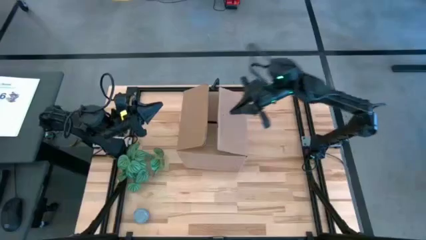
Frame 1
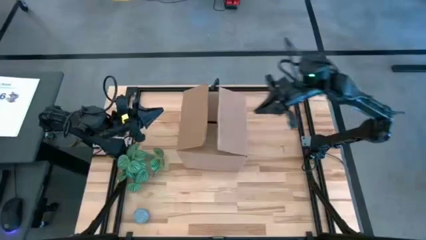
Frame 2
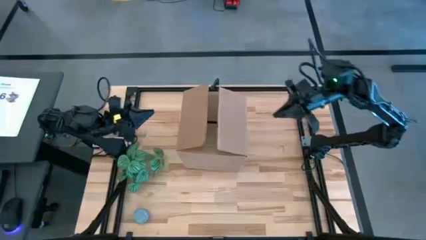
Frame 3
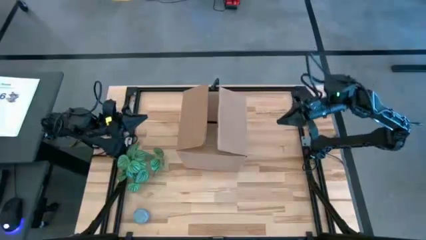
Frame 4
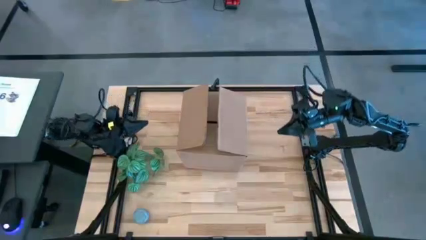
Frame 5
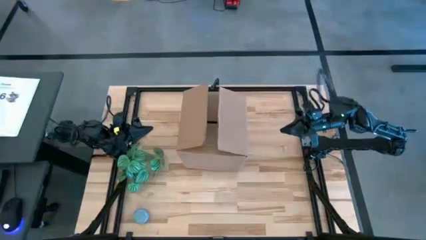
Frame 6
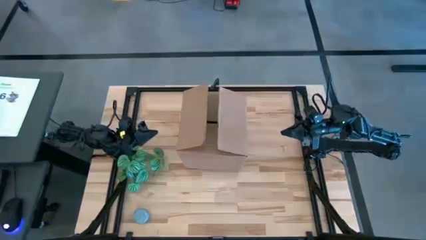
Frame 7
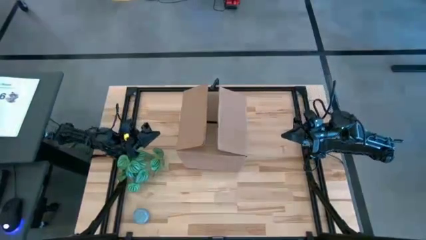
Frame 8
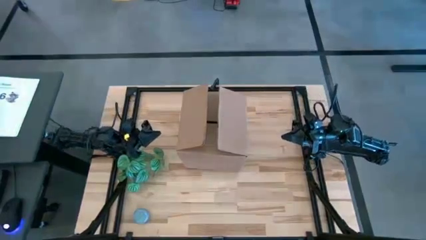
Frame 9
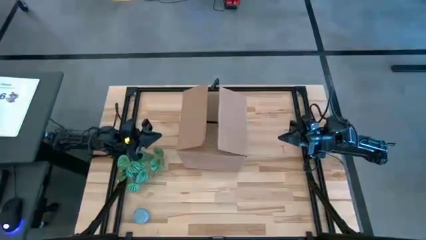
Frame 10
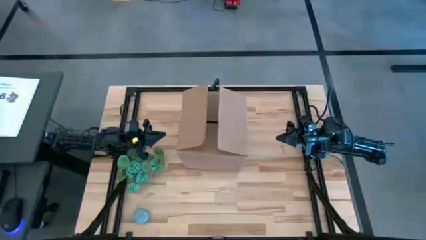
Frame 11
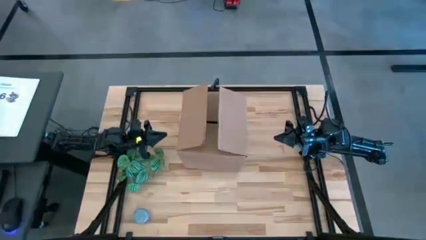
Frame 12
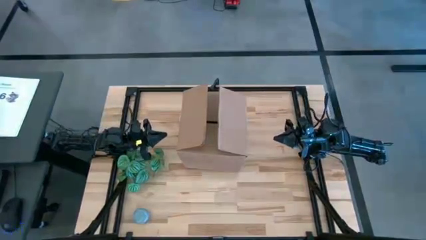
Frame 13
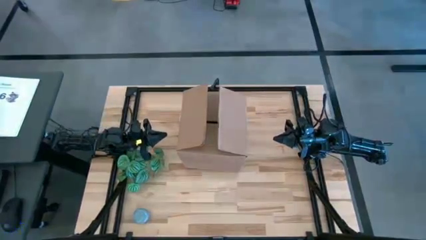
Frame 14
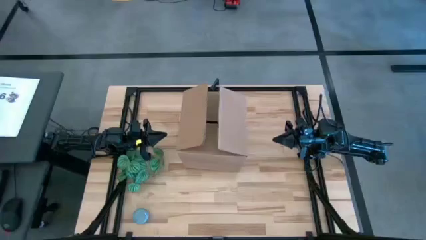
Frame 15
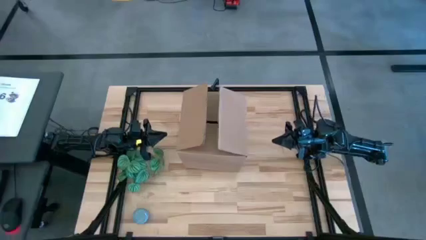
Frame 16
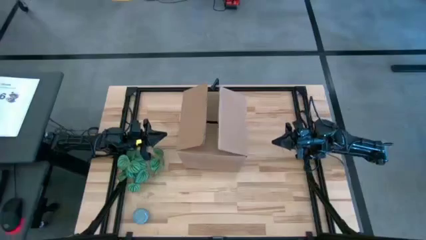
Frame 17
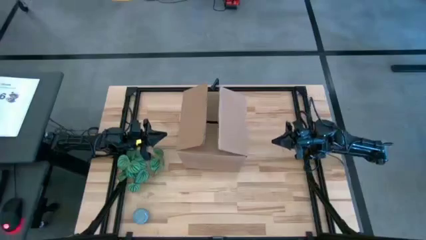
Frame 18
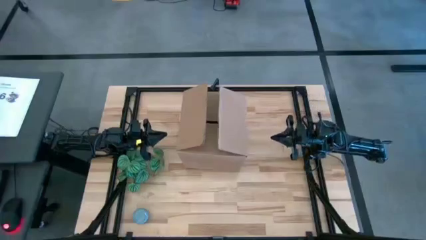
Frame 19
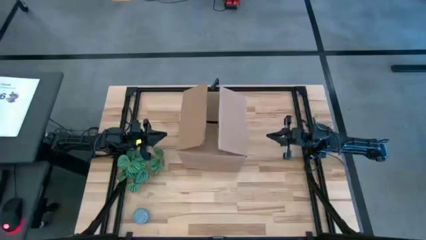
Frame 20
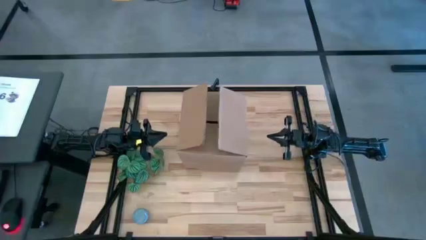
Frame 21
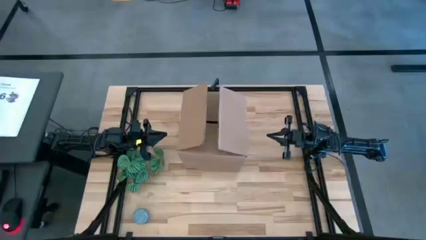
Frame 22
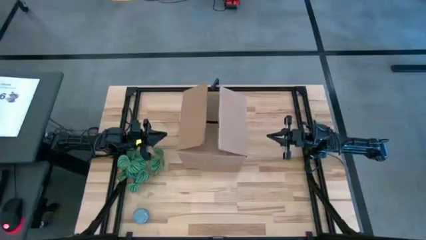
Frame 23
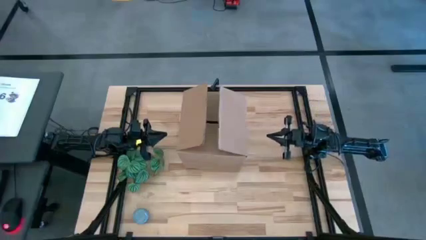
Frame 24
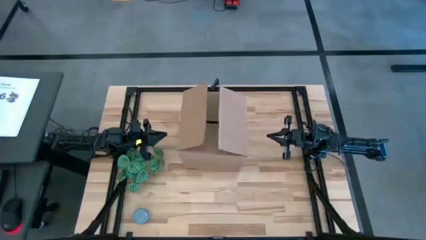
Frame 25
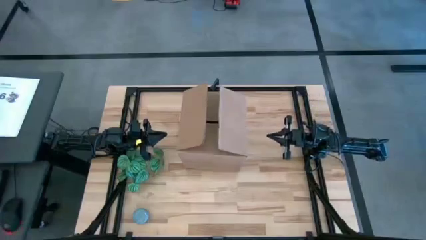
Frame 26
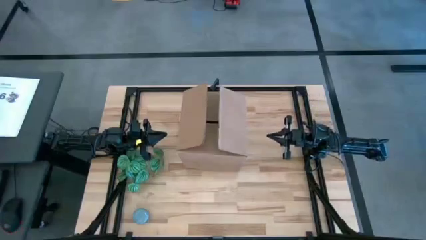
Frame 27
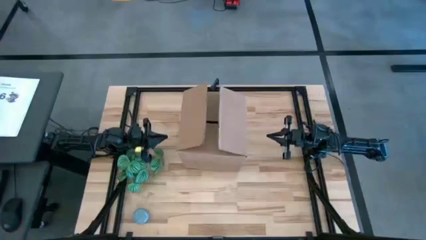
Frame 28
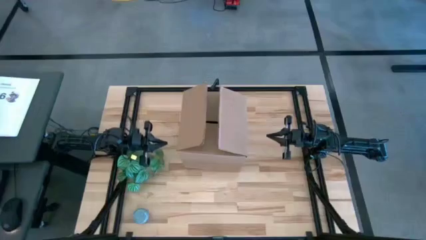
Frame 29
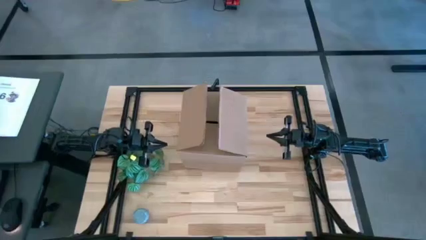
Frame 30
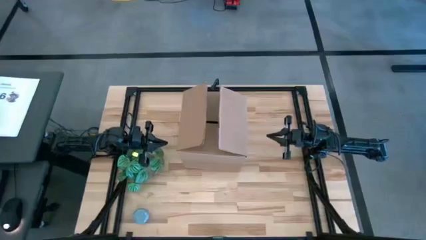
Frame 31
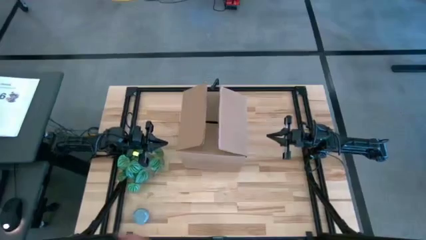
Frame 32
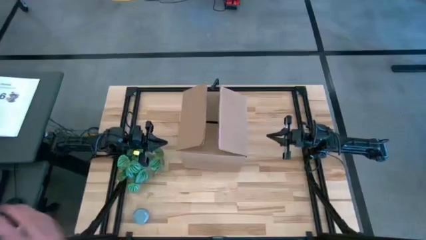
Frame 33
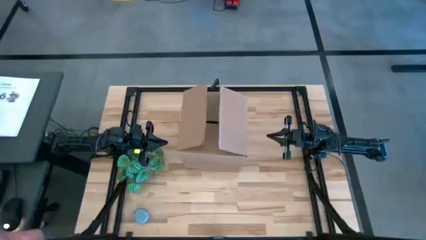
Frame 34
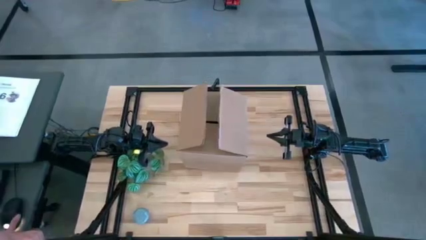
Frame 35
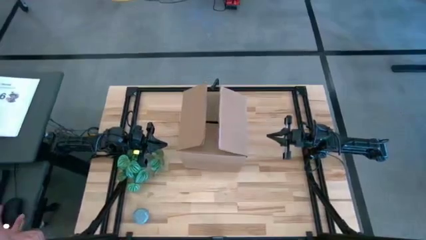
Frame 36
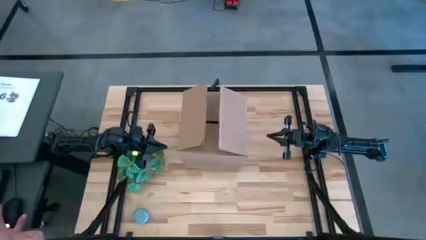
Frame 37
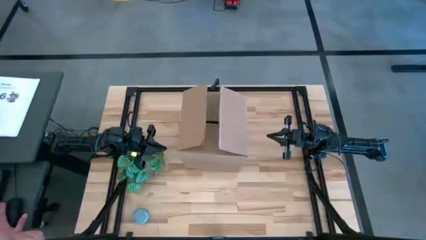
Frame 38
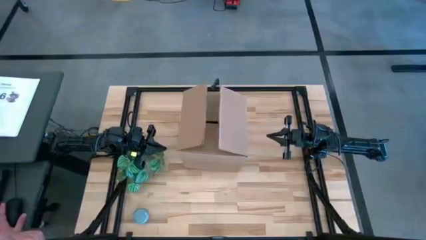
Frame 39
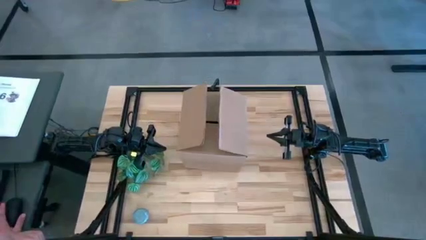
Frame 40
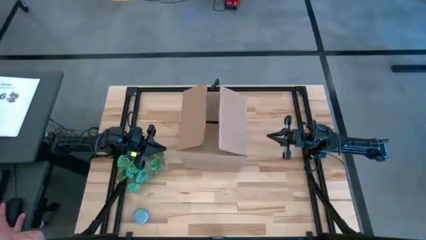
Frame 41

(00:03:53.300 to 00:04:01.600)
Task: wrap mug
Return to Home Position

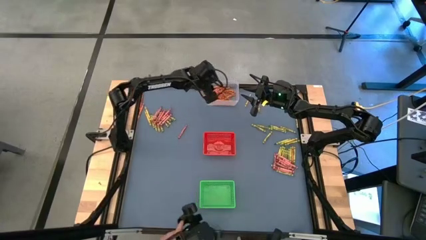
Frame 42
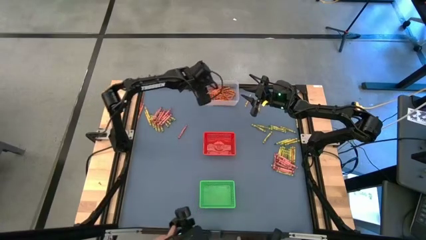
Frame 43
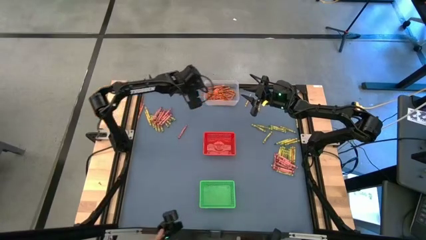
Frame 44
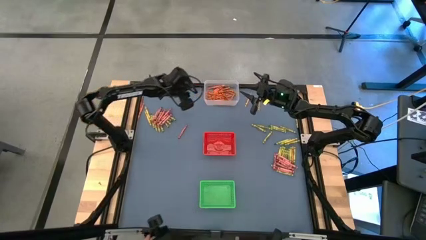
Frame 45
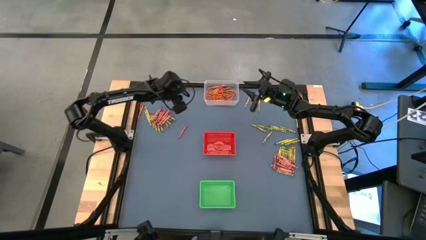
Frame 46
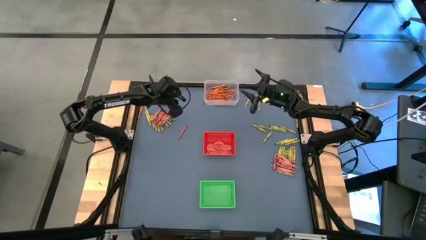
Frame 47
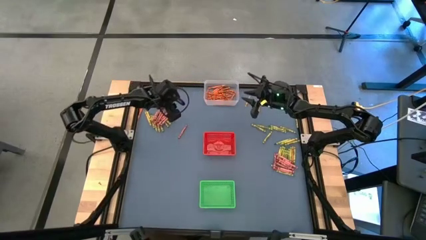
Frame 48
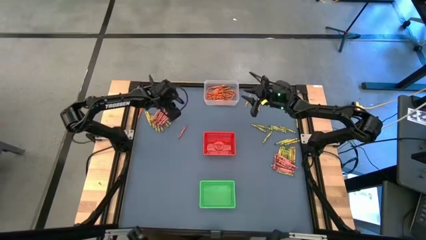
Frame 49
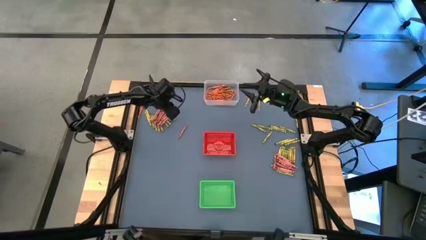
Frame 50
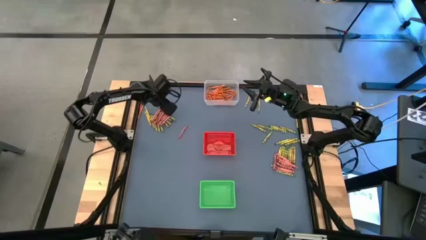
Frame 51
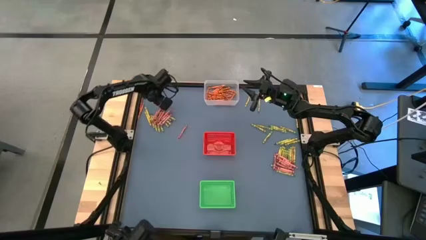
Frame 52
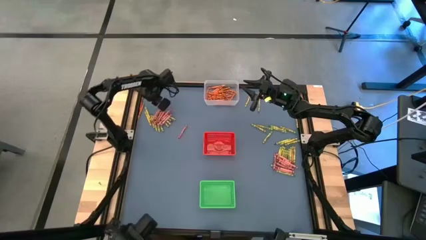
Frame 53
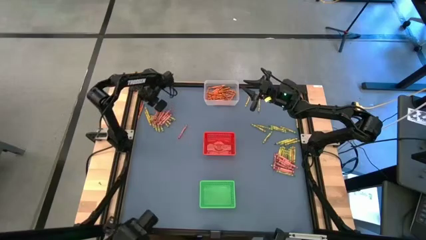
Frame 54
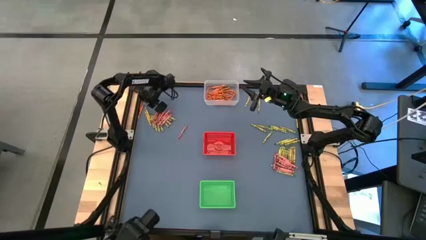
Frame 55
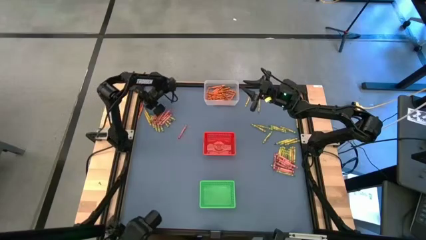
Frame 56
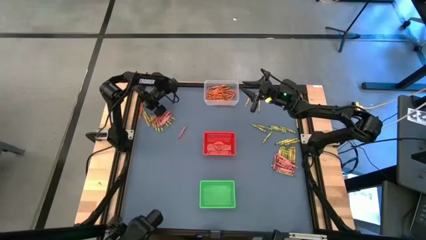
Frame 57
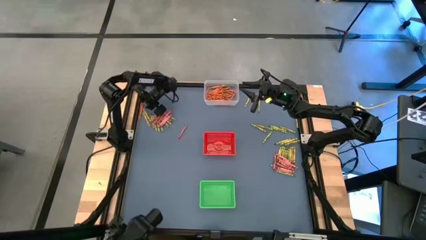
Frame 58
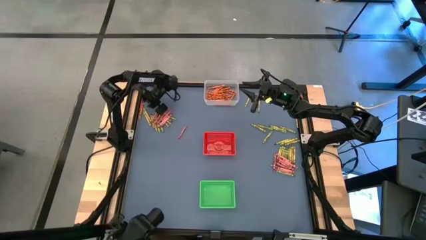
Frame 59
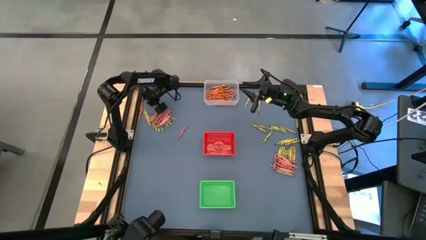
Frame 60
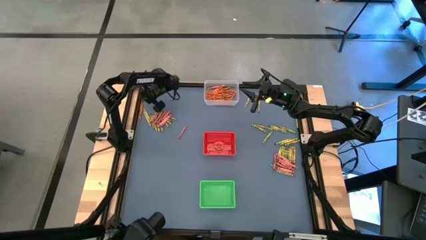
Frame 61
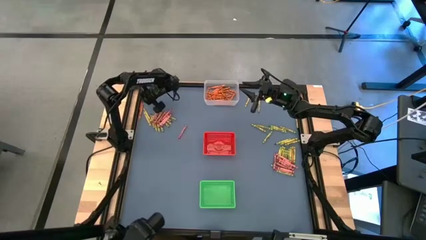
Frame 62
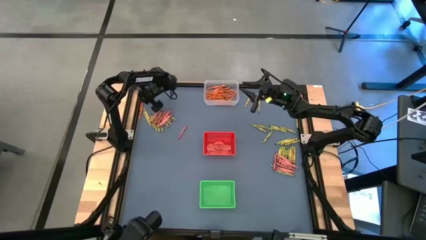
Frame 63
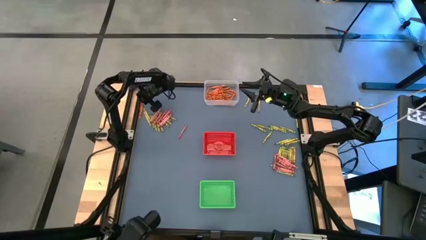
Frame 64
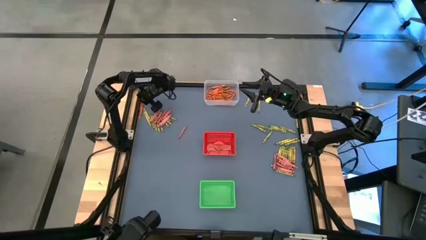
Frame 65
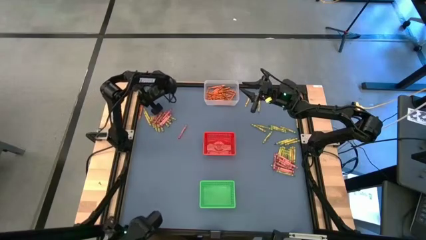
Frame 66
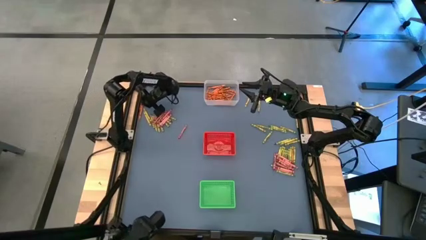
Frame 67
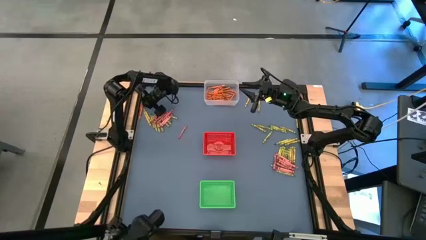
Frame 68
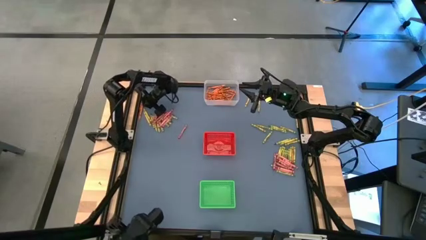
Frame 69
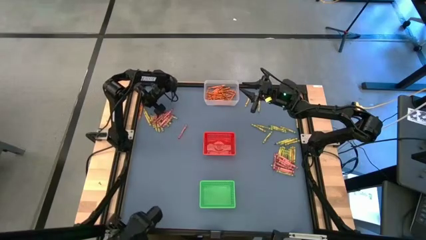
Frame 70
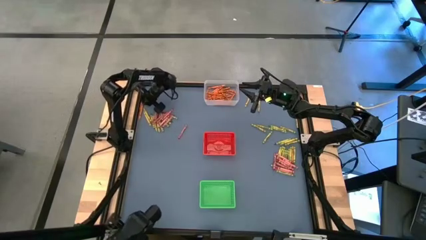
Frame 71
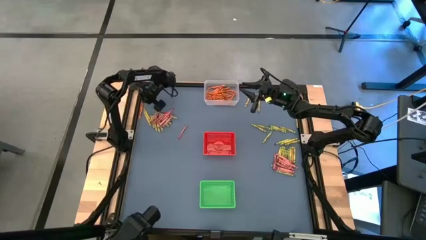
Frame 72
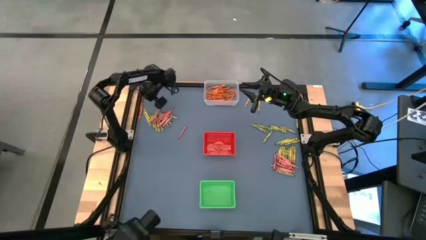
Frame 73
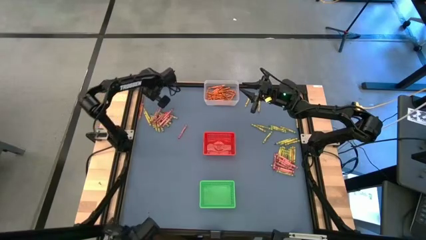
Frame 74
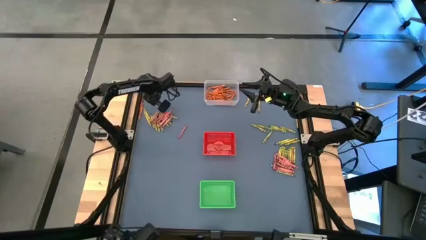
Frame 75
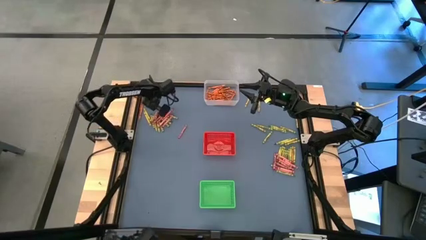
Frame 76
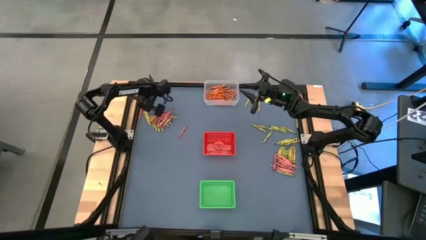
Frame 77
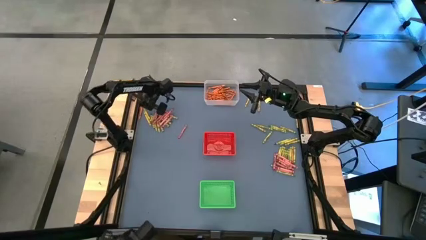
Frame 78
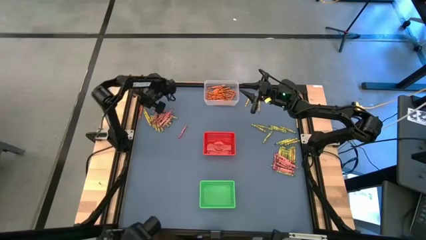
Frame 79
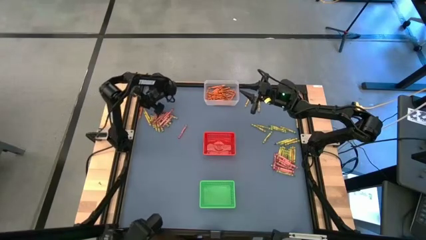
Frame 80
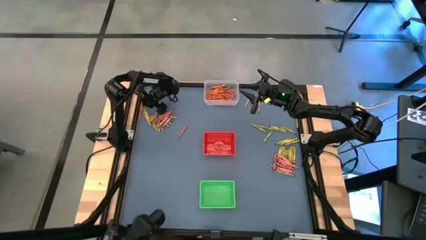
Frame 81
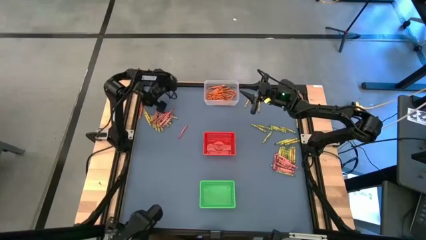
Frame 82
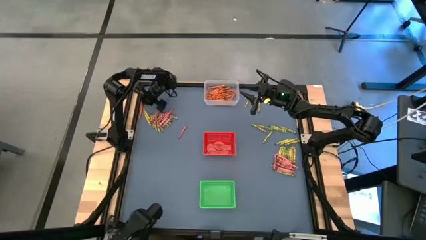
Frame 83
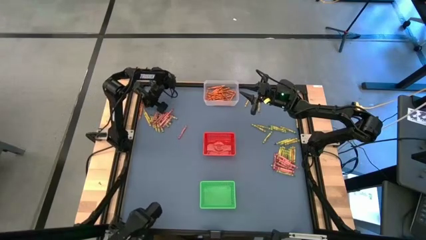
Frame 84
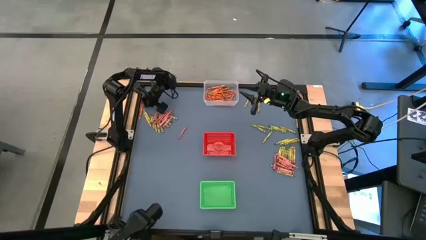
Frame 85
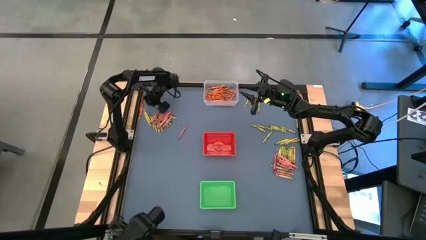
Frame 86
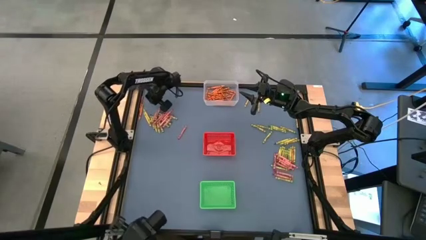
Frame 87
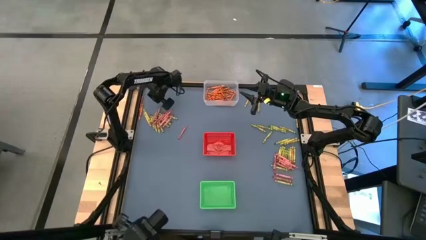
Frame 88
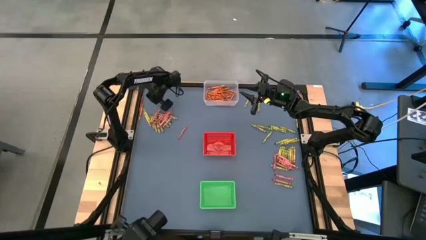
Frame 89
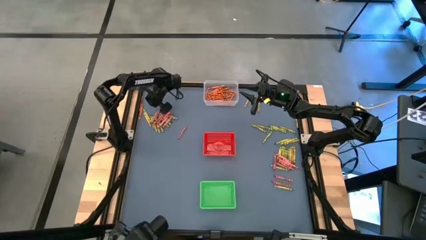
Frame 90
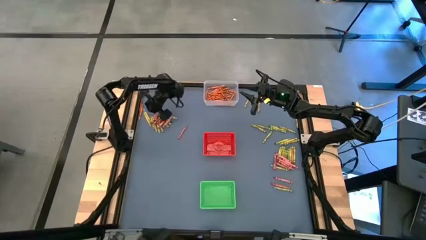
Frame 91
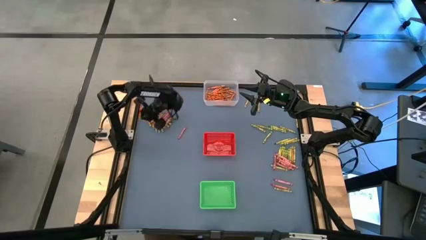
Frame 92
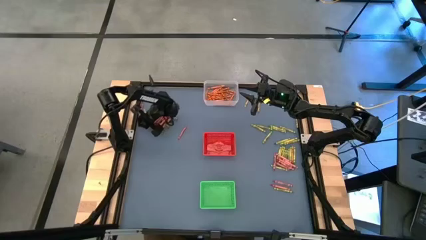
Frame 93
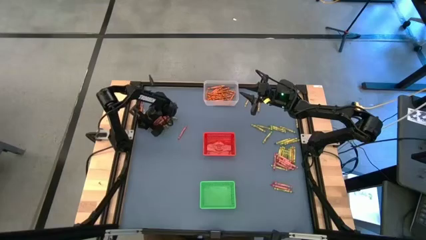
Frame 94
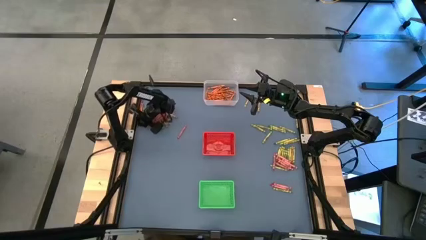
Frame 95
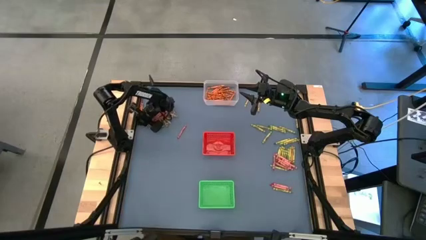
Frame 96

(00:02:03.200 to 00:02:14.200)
Task: Sort crayons
Put the orange crayon into the transparent bin
